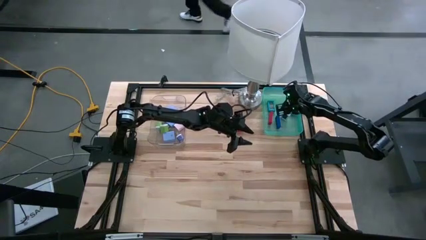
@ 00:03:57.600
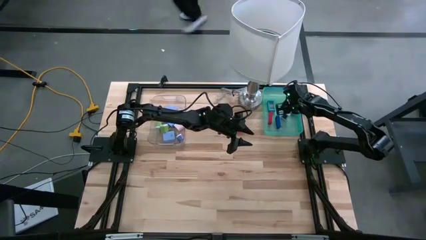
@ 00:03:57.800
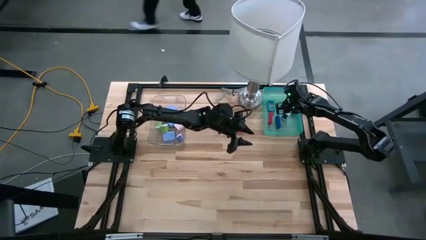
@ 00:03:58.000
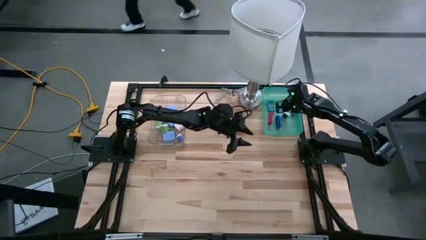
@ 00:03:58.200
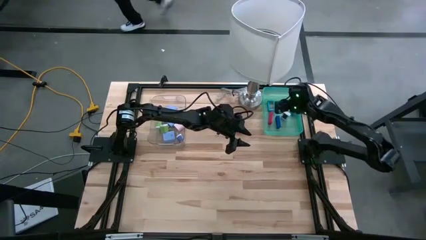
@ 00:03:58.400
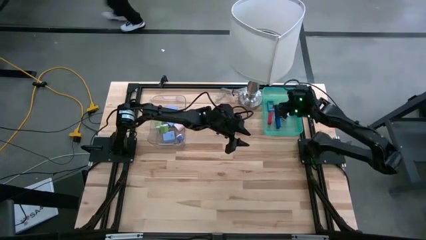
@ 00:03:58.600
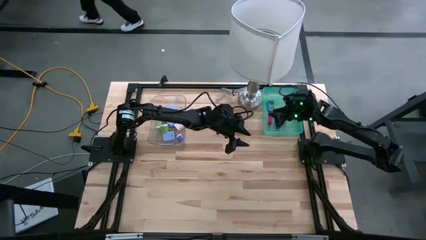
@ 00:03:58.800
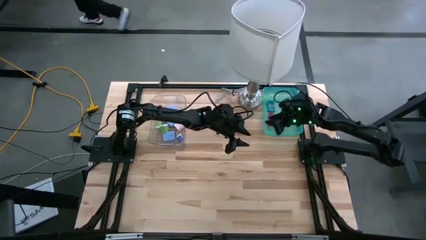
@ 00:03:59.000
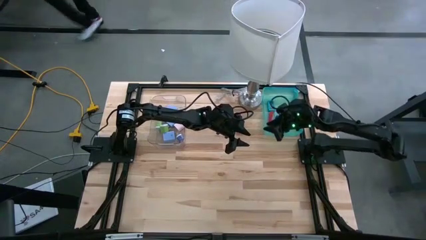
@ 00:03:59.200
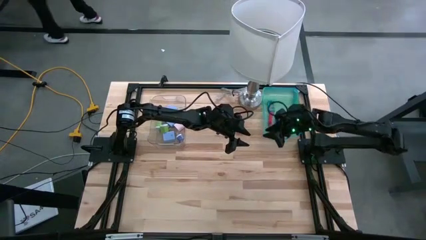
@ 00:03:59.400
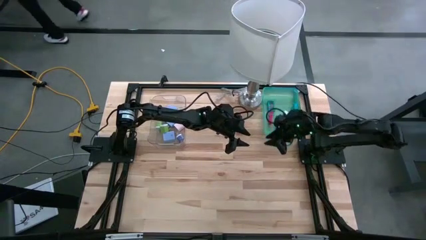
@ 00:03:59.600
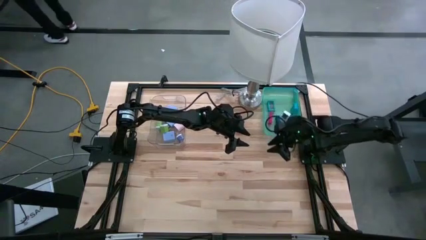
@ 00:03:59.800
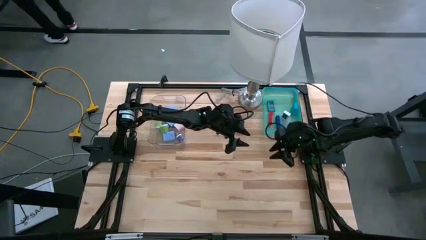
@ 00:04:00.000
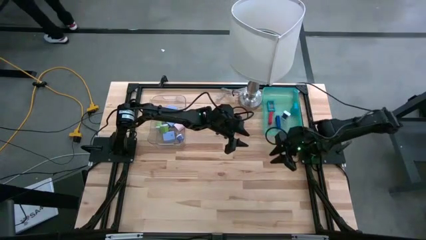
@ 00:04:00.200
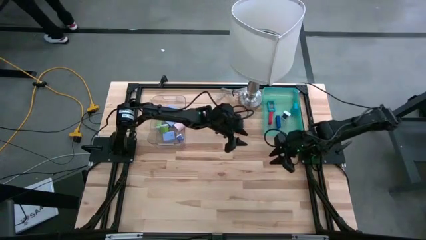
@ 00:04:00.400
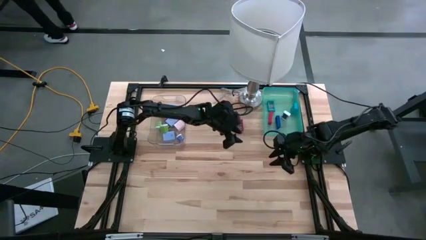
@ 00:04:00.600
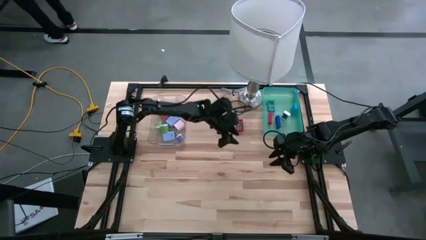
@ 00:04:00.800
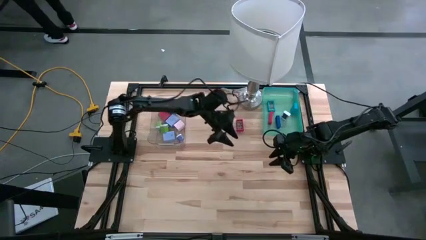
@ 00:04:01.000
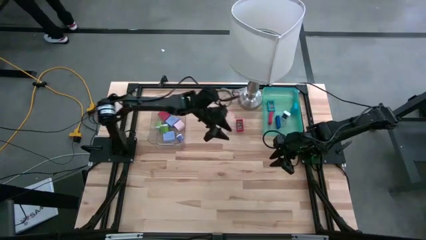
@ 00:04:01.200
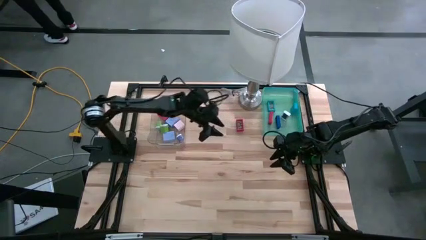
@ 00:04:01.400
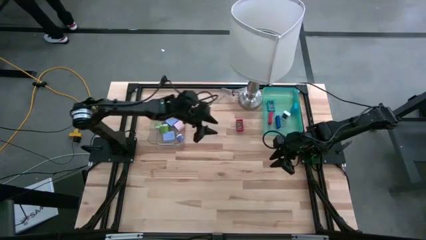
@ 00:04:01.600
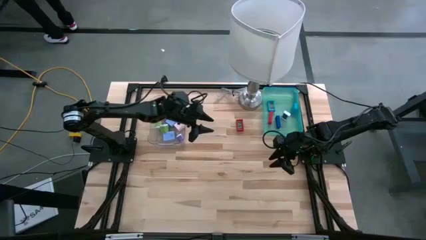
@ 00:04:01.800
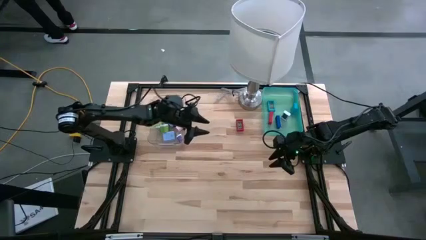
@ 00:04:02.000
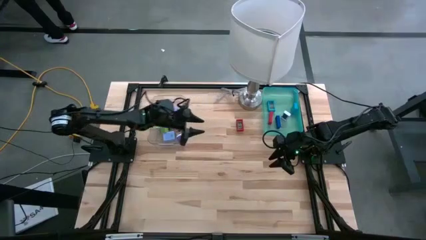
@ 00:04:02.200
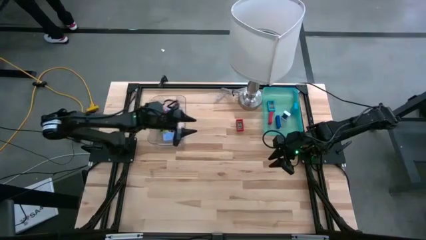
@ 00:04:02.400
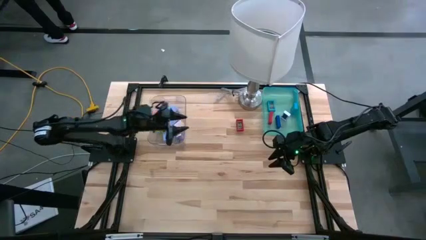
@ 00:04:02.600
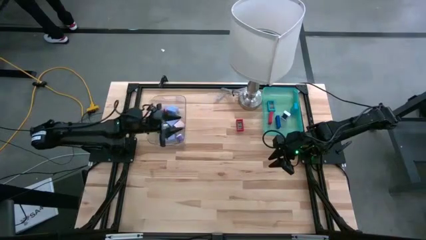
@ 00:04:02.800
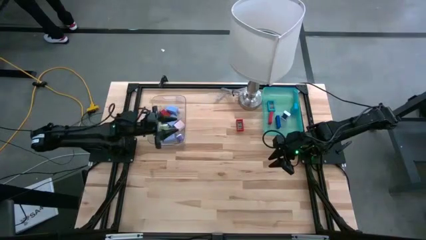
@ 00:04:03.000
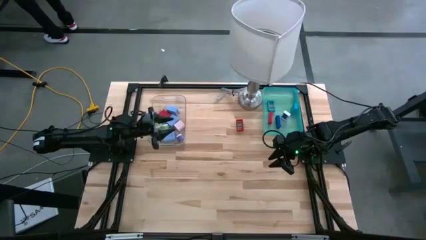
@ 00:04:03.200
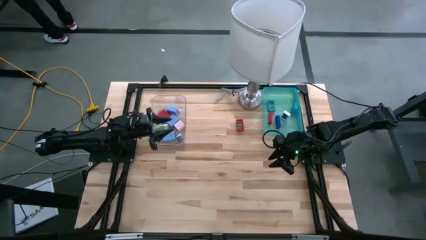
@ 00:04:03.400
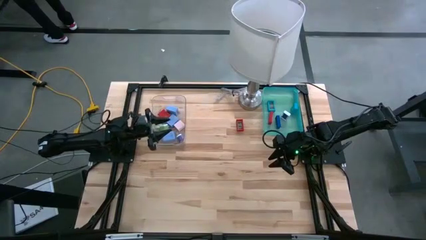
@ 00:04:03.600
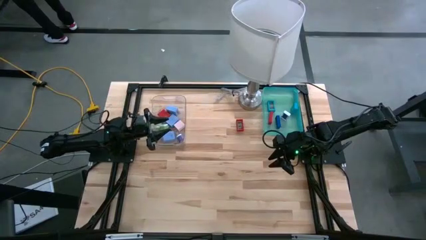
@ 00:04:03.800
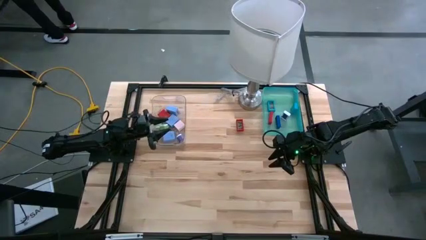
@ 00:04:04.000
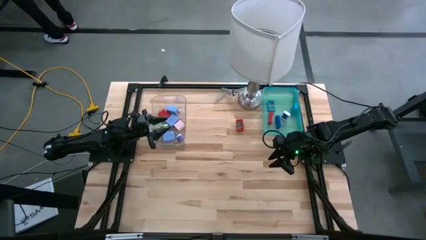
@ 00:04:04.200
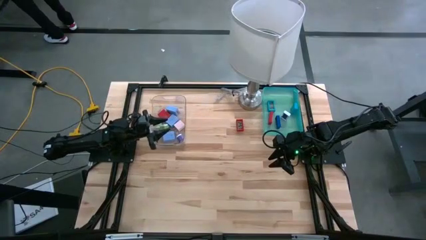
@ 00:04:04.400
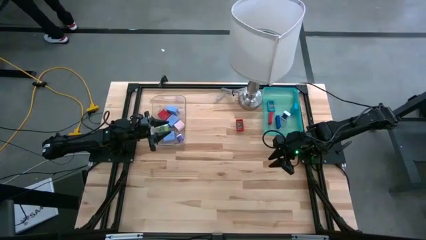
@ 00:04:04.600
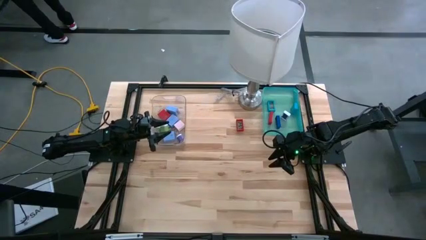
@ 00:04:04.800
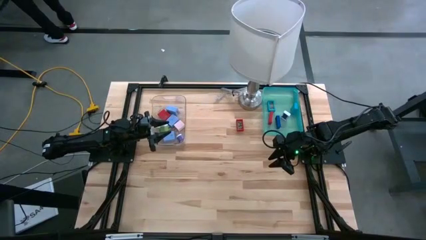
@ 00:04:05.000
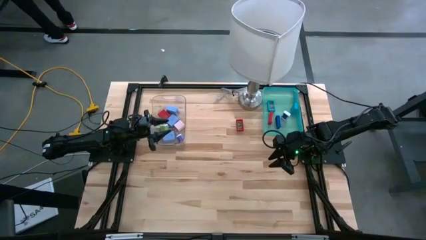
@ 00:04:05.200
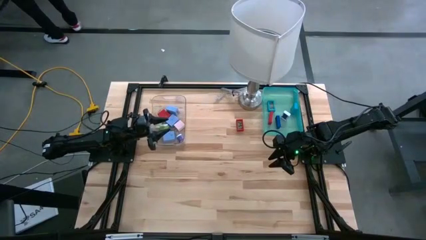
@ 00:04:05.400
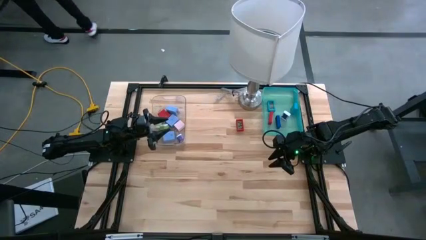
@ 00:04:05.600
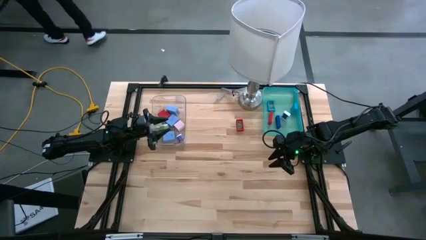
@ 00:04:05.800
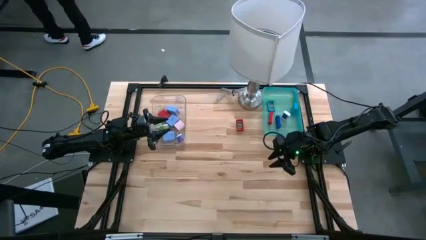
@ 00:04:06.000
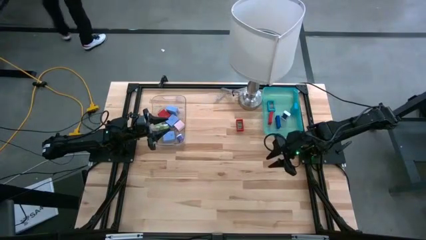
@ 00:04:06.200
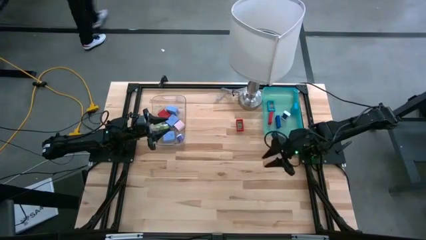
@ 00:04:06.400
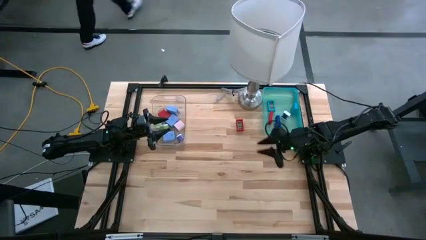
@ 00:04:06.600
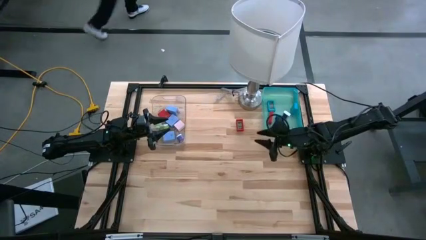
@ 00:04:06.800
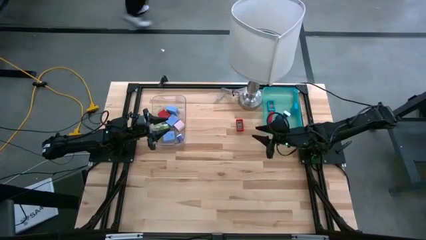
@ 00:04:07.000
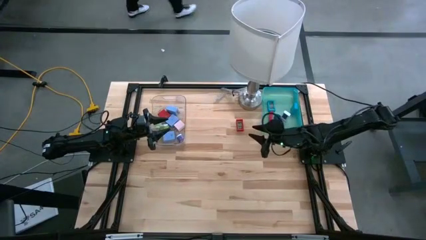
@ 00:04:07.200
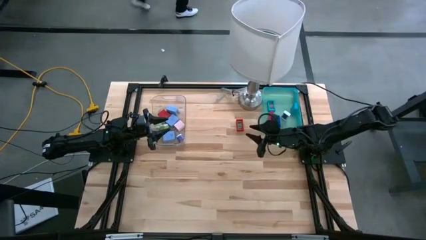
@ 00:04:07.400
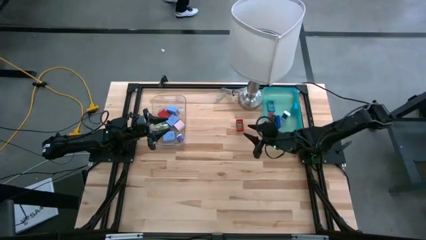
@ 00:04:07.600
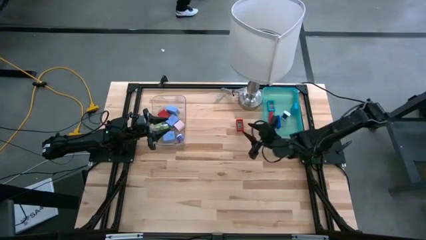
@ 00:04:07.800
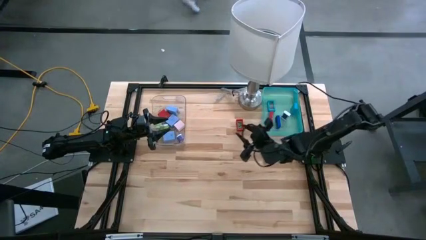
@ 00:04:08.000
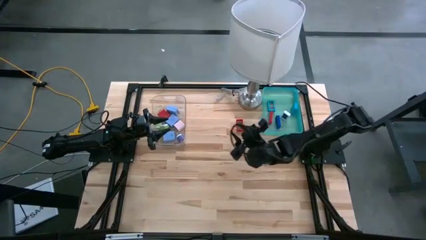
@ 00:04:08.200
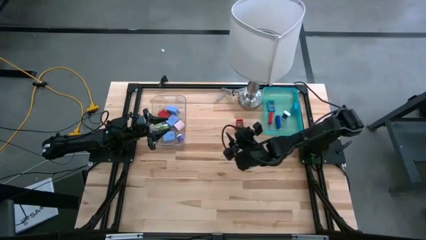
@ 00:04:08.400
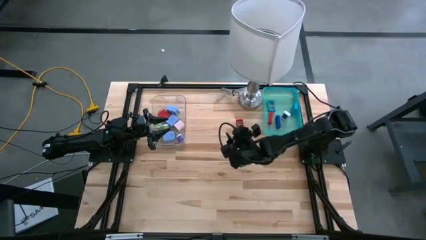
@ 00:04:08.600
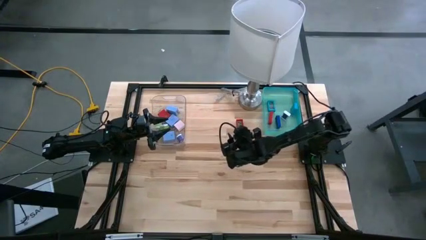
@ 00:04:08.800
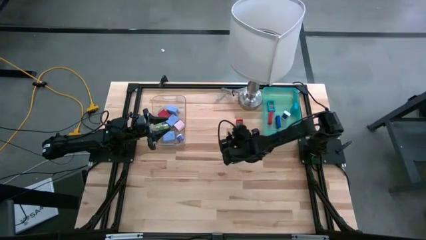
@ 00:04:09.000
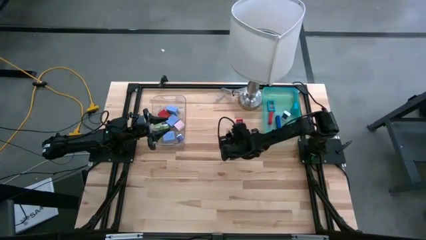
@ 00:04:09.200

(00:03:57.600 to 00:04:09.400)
Task: Pick & Place Office items
Put the red mini digital clock into the light blue bin

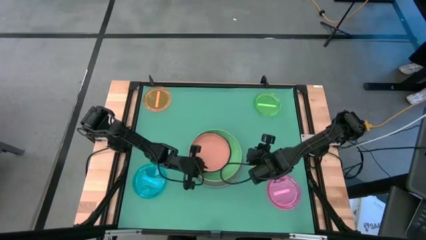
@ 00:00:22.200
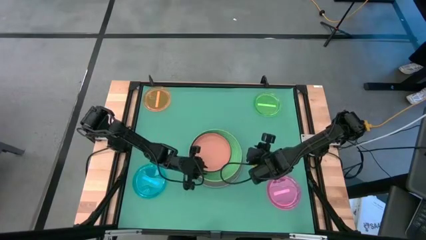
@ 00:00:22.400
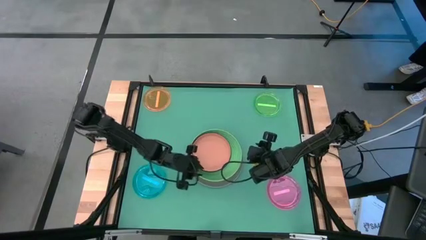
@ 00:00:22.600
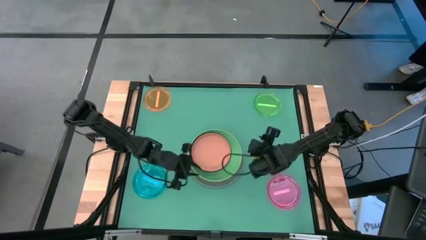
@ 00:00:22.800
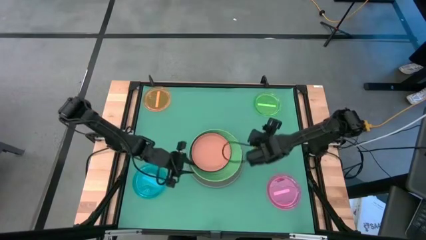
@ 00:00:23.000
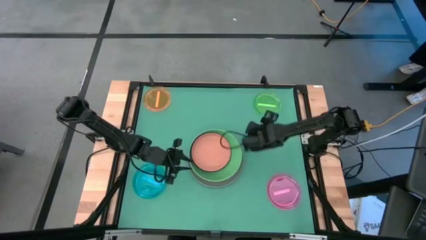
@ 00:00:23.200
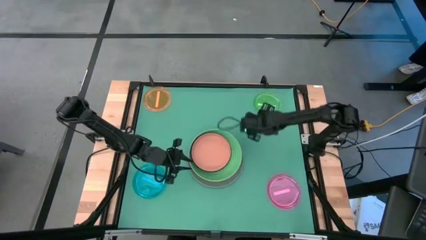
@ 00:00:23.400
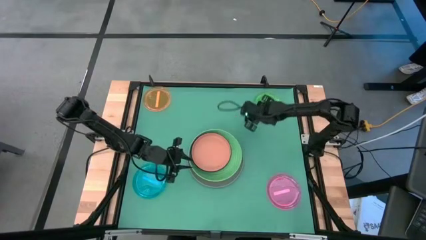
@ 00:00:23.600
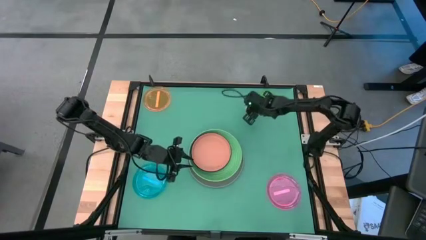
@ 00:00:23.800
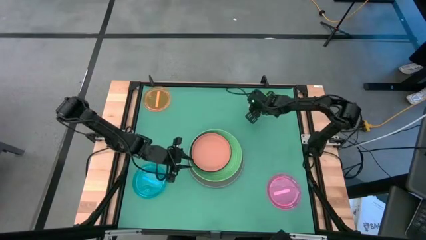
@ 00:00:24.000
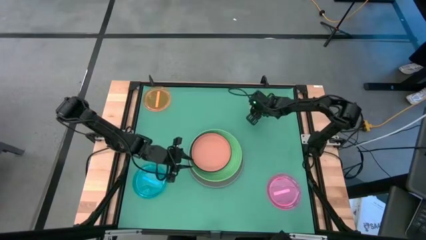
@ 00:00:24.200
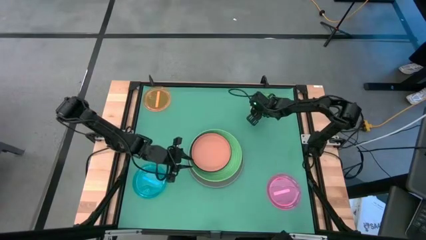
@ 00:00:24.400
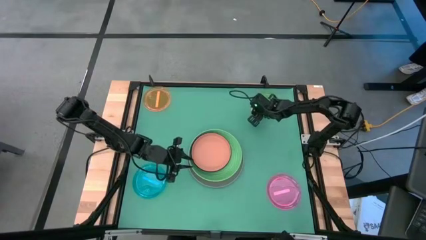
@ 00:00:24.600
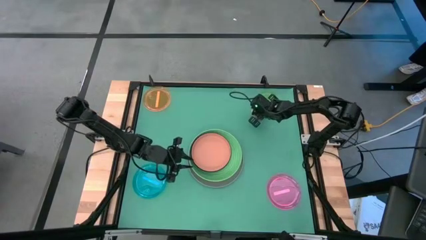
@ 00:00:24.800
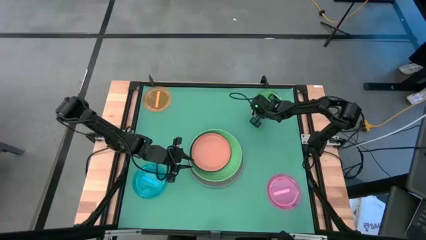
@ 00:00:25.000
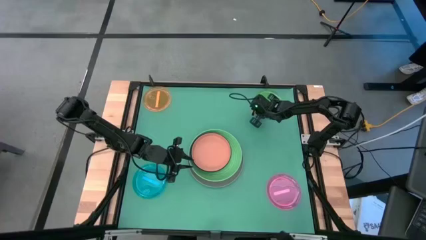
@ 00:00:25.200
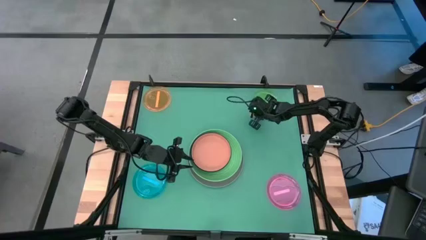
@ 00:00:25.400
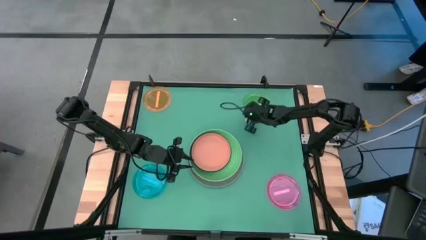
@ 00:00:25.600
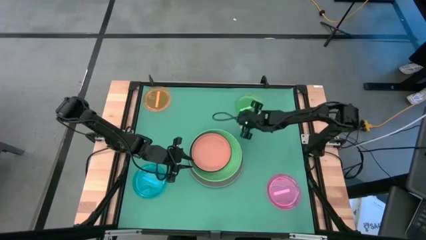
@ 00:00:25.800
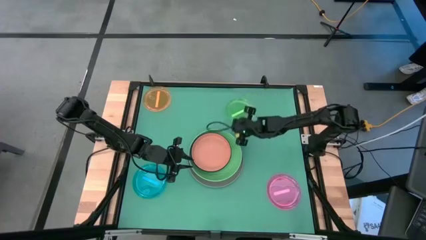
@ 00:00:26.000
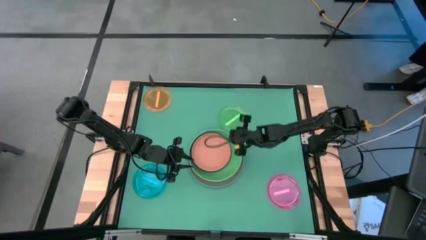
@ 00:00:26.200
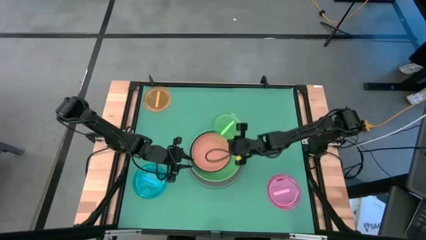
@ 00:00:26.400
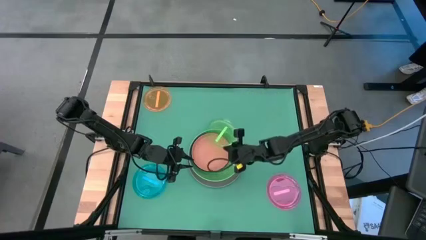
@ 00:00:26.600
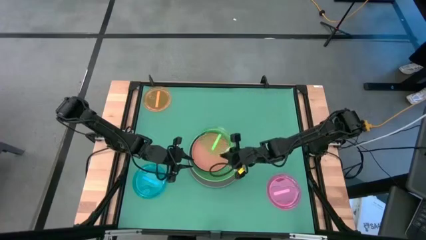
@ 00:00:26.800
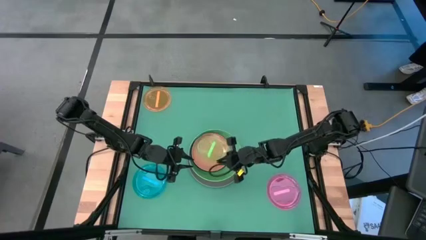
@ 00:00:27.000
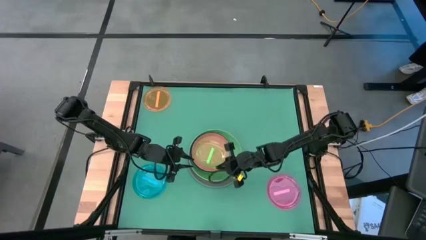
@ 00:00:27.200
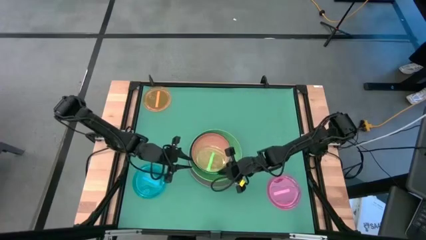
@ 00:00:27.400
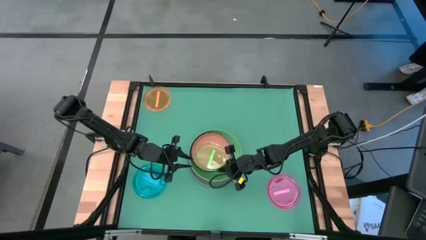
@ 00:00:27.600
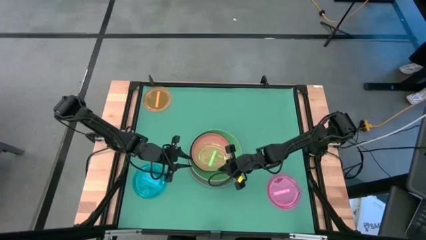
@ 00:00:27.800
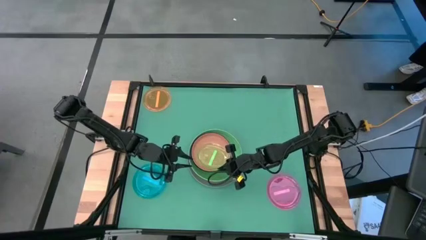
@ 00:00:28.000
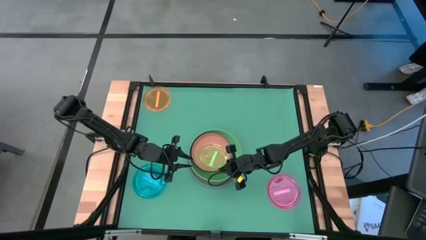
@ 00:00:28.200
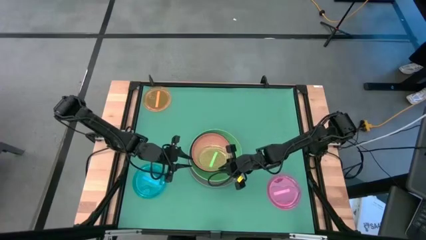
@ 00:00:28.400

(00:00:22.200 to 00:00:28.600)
Task: Stack plastic plates
Stack the light green plate on the pink plate
